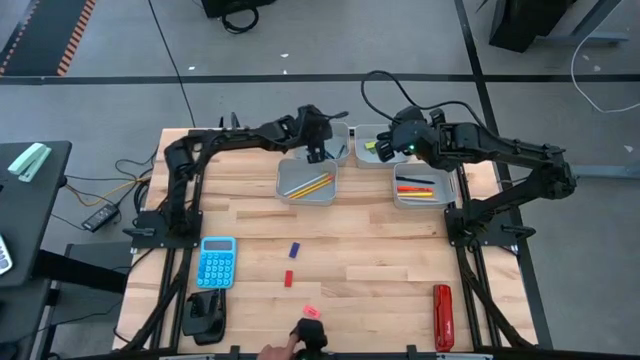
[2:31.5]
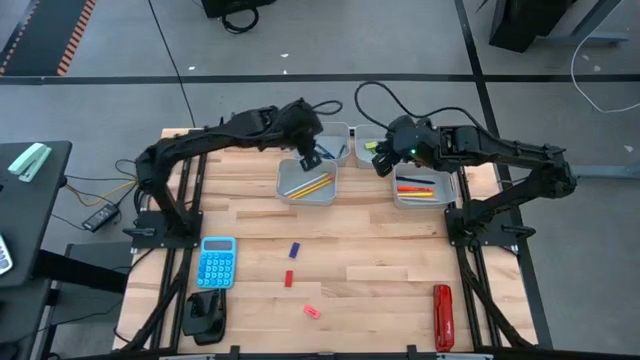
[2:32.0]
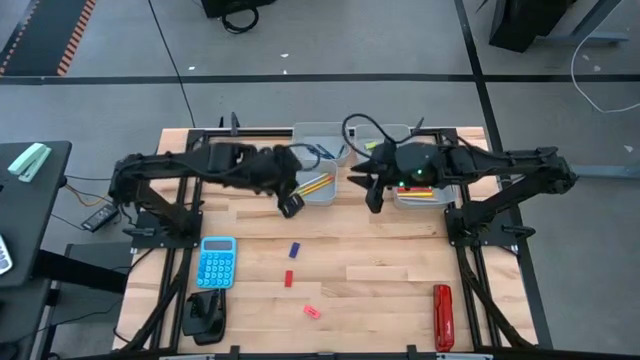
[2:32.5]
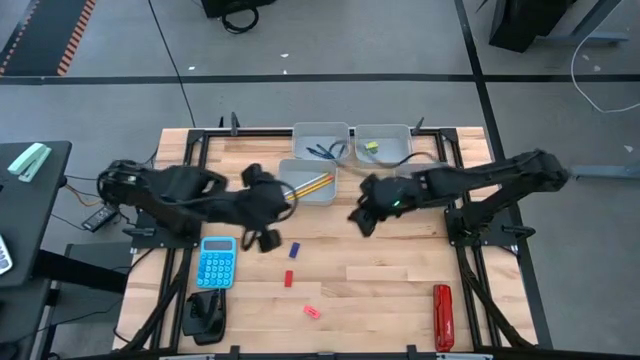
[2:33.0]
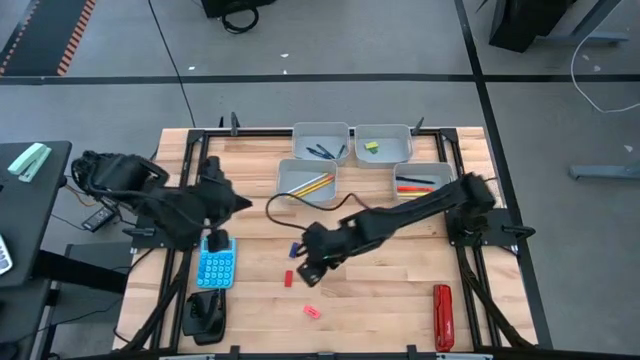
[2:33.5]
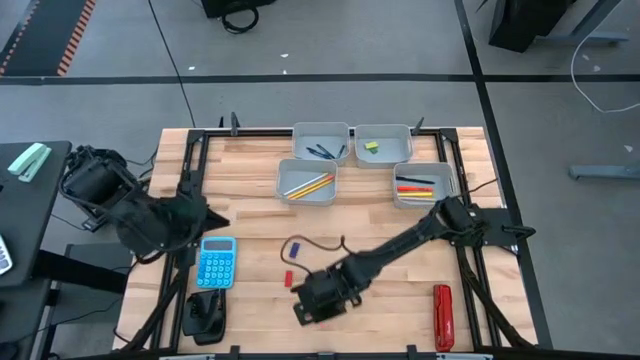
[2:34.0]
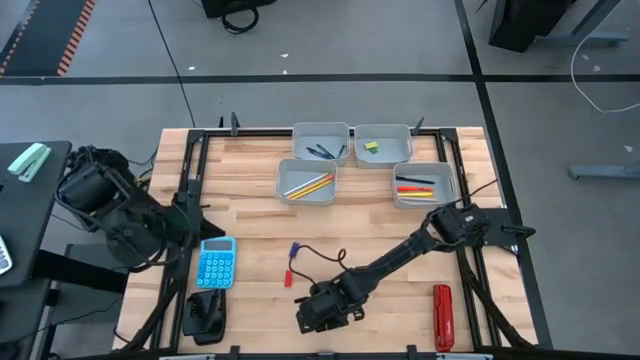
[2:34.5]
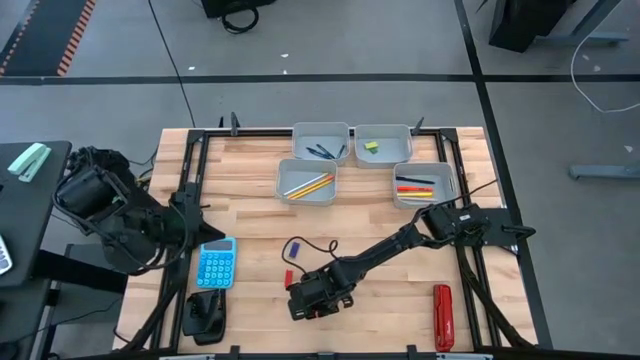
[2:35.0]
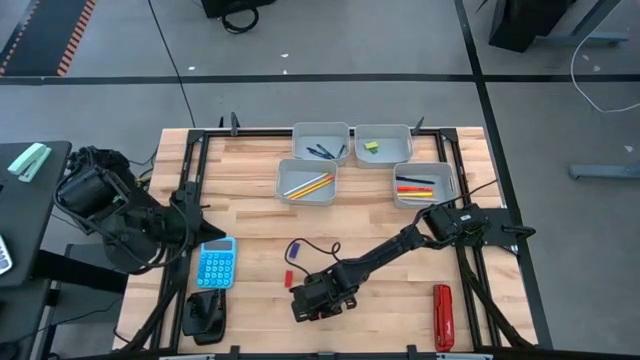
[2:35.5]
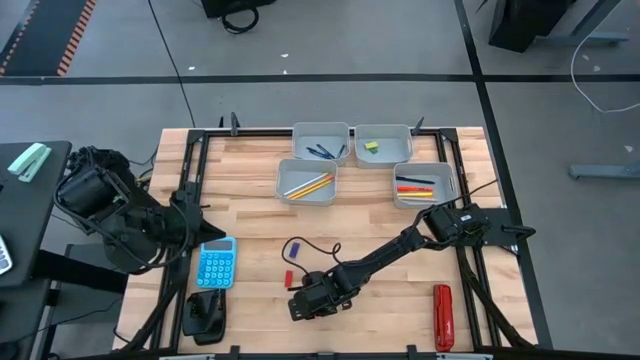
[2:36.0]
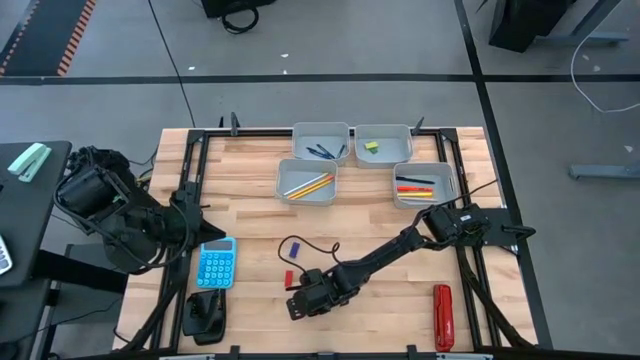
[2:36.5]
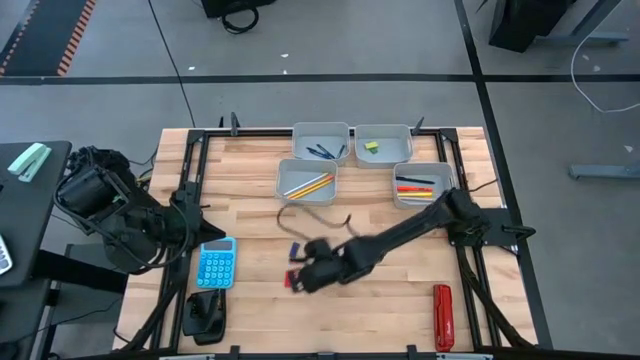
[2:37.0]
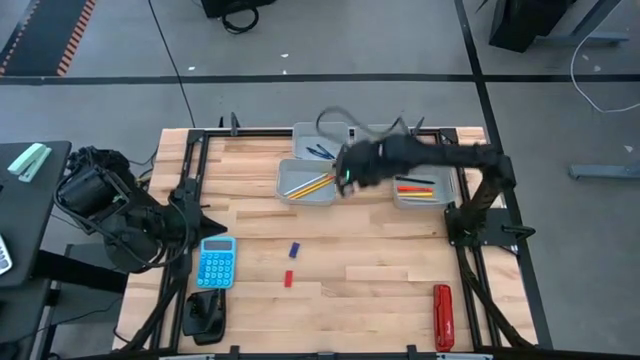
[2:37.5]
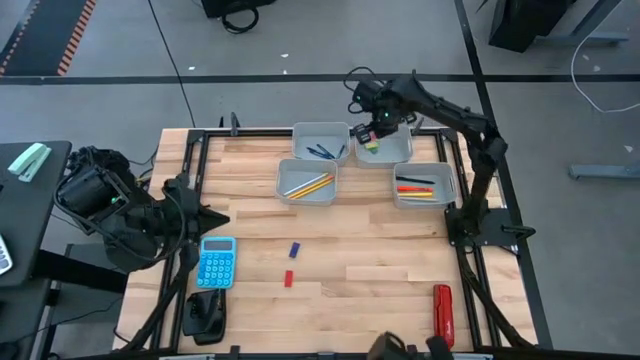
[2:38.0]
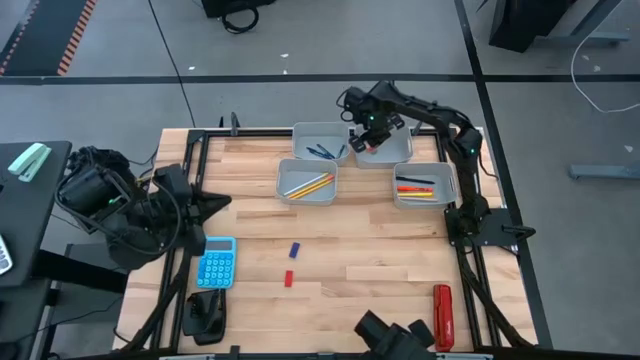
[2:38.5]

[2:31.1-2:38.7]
Task: Sort crayons/erasers/pens/pencils in bins
Put the pink eraser into the top right gray bin

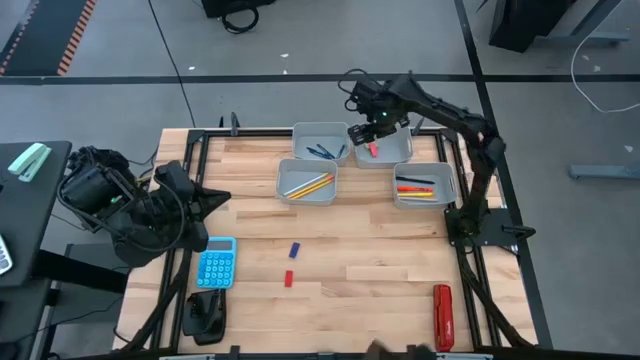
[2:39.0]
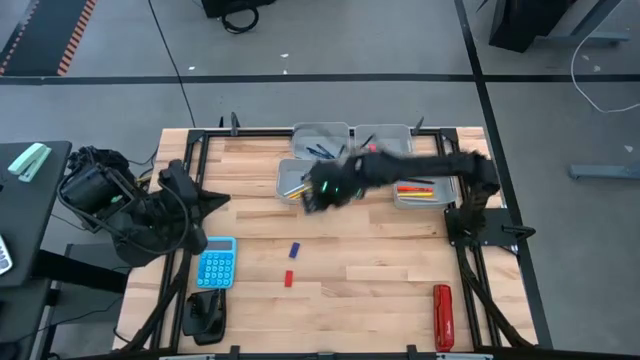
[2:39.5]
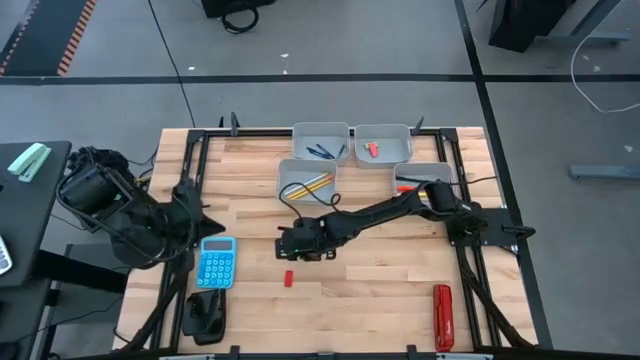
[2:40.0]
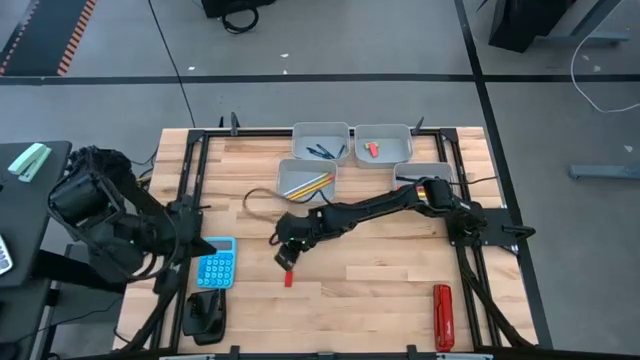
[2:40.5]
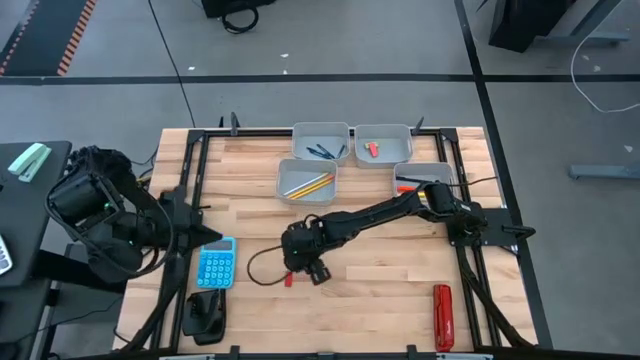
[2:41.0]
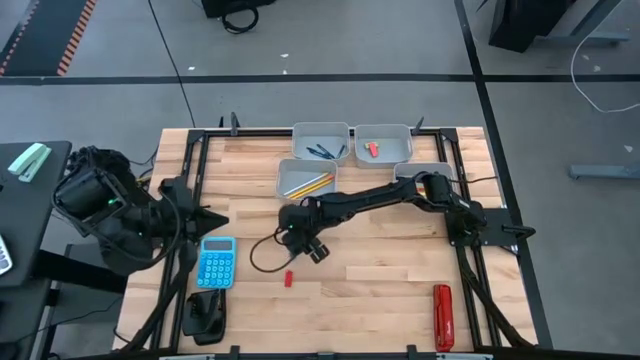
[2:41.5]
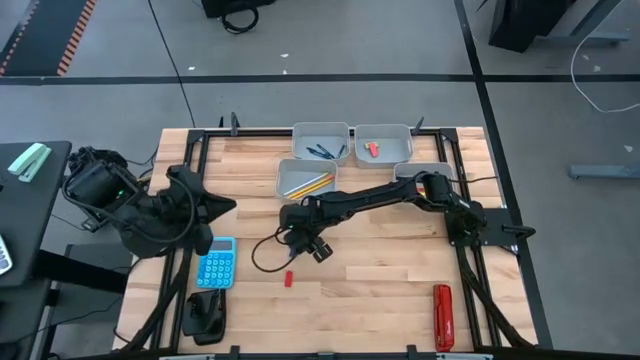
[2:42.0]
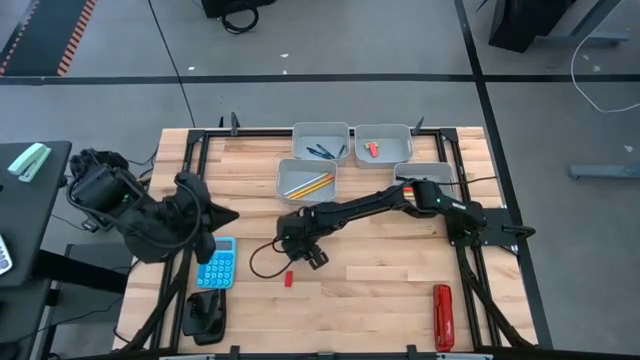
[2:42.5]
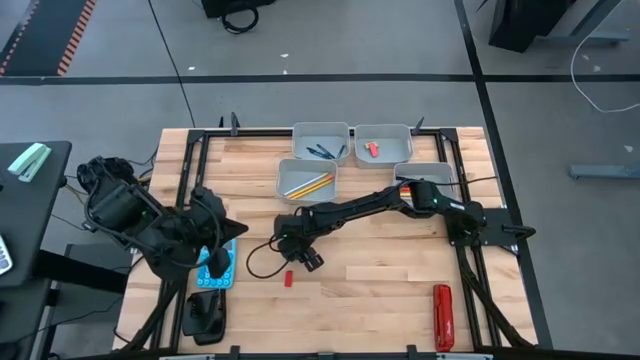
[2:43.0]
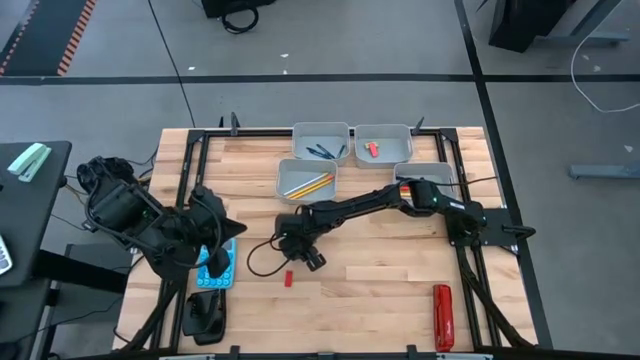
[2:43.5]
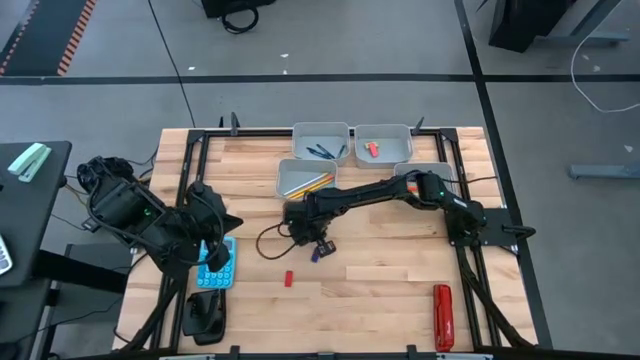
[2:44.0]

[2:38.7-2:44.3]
Put the blue eraser into the top right gray bin

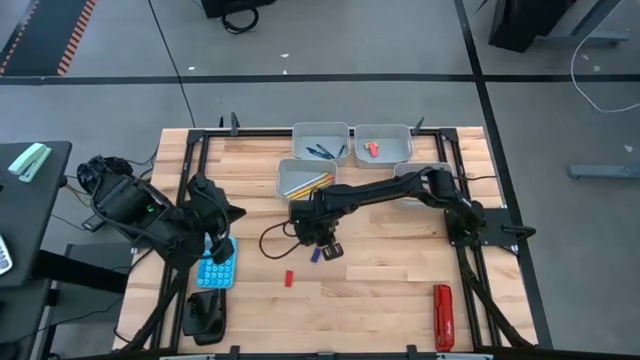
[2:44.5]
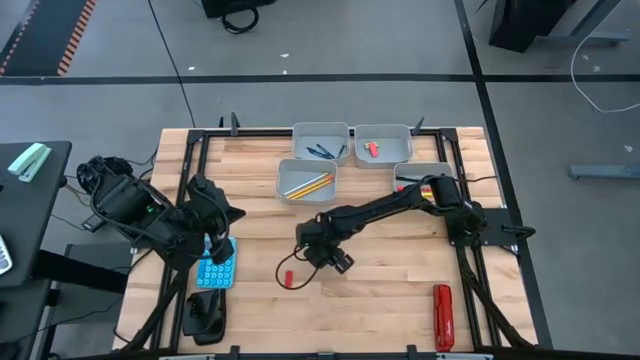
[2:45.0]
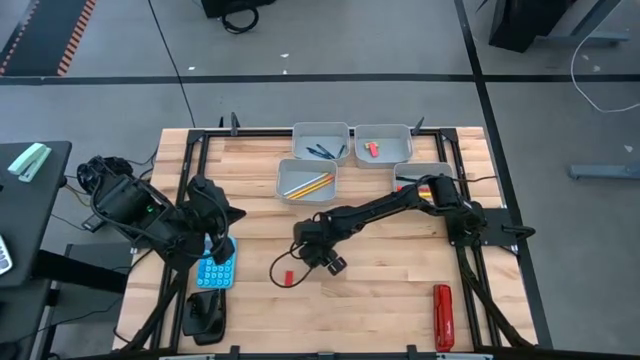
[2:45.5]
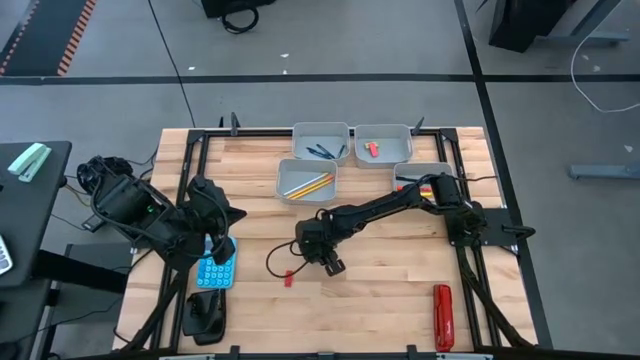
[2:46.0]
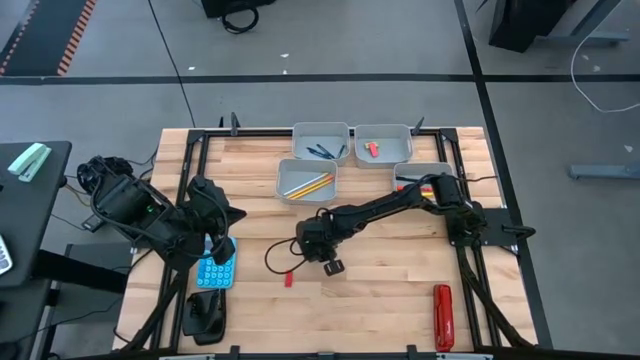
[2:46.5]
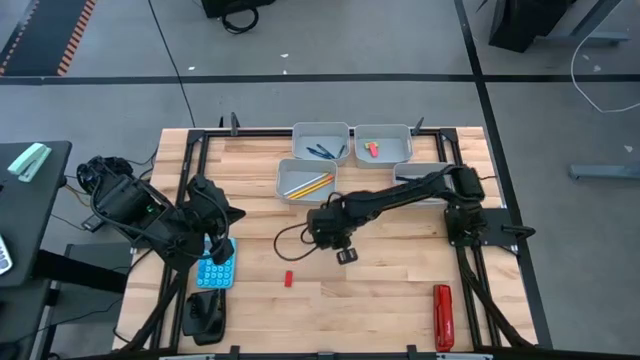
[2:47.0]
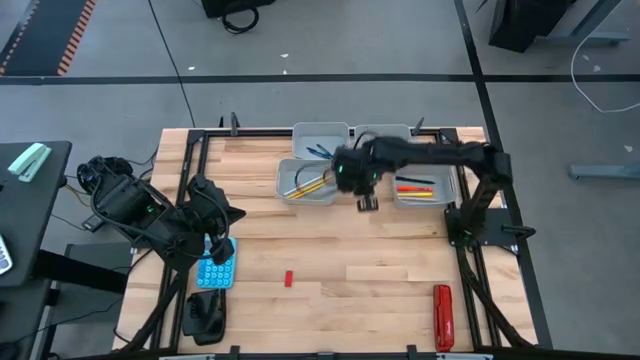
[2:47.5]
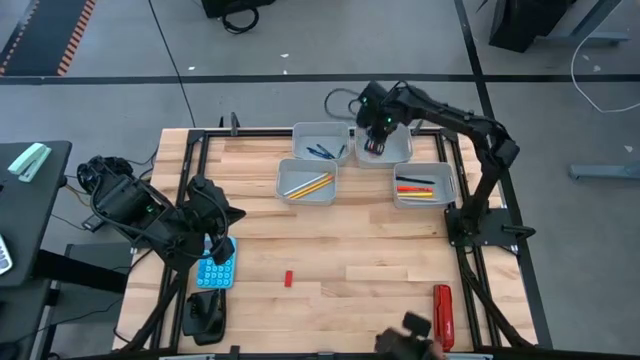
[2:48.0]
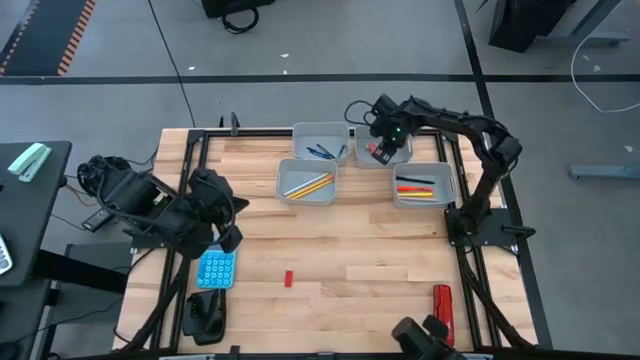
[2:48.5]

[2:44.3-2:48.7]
Put the blue eraser into the top right gray bin

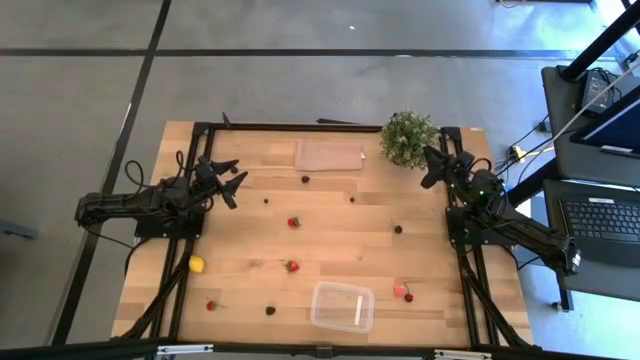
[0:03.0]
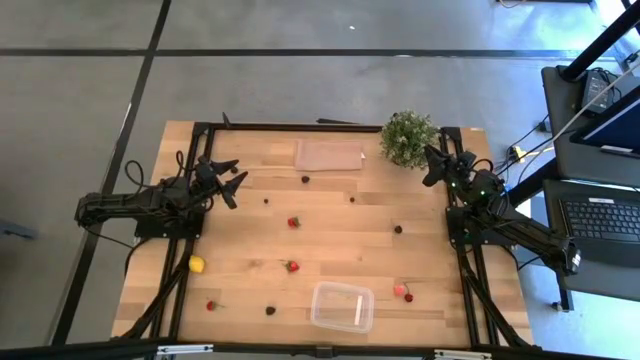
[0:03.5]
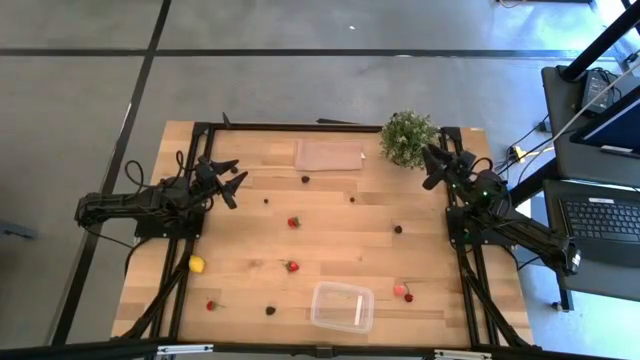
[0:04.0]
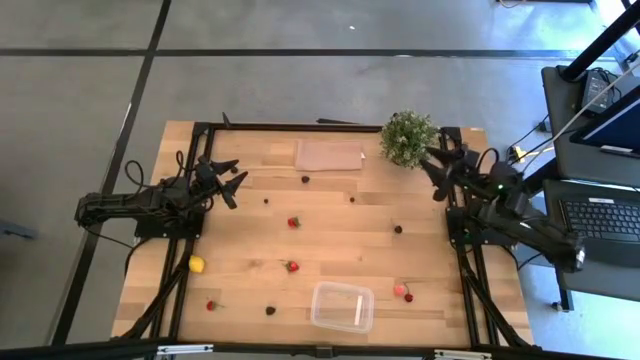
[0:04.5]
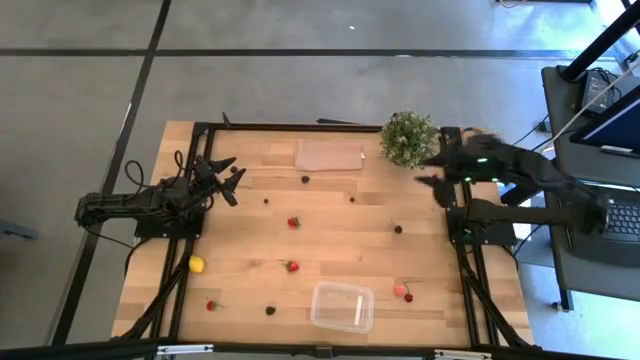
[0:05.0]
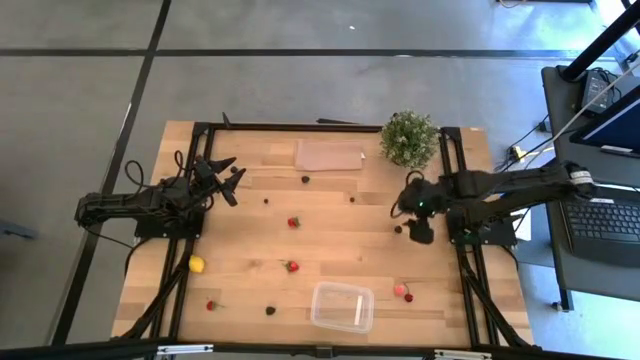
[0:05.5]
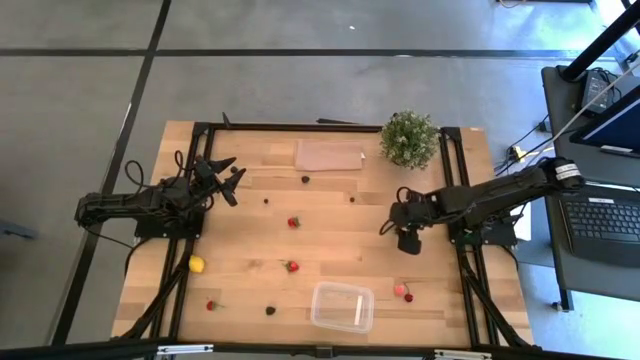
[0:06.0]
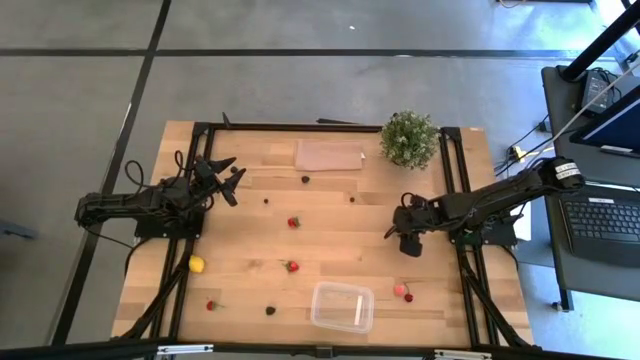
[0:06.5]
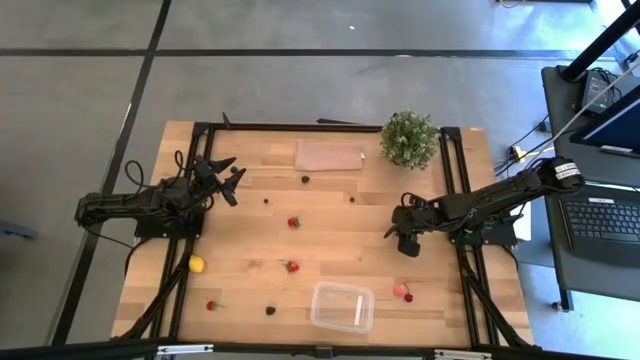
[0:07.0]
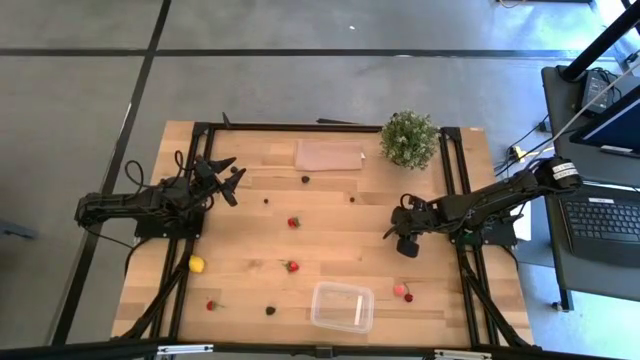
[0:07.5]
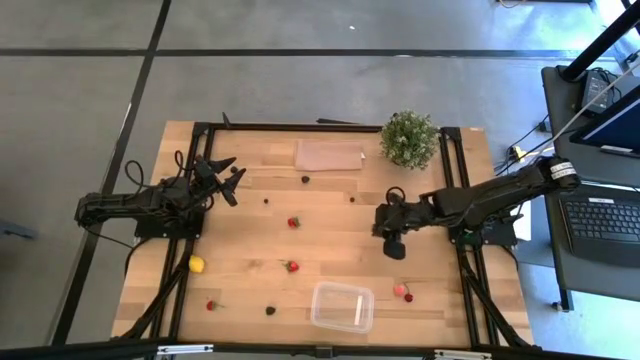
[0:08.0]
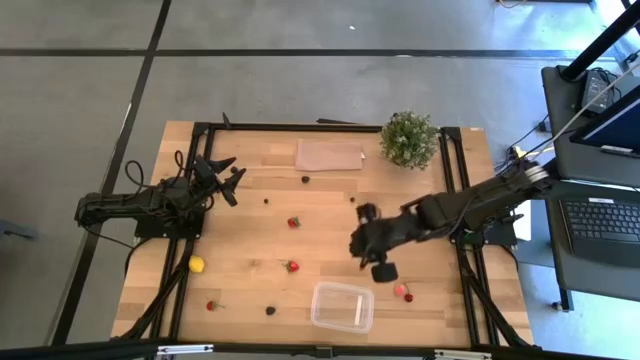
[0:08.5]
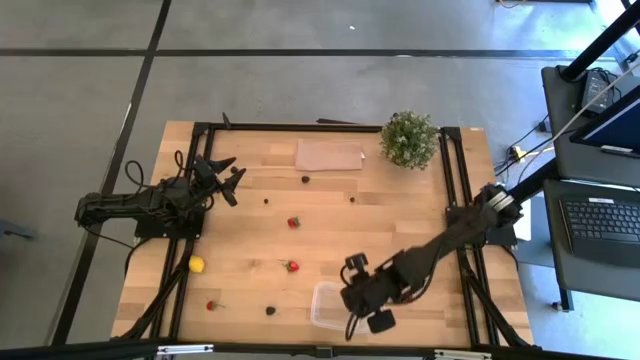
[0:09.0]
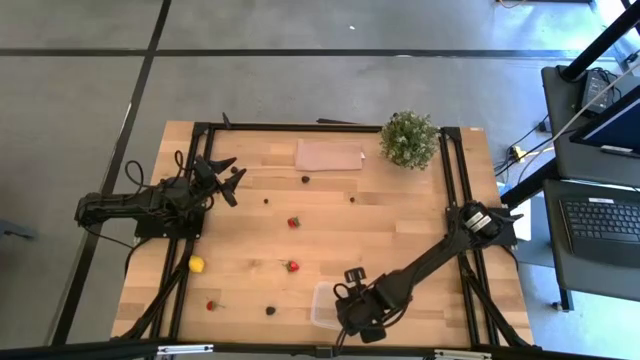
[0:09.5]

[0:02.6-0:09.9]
Task: Pick and placing Produce into tupperware
Put the bottom black cherry into the transparent container
